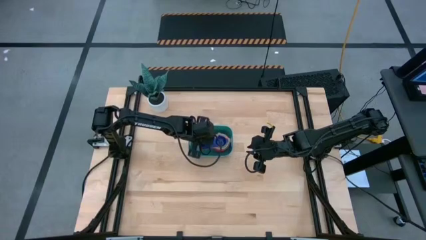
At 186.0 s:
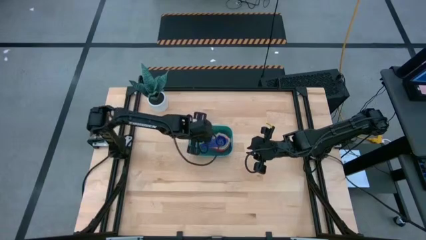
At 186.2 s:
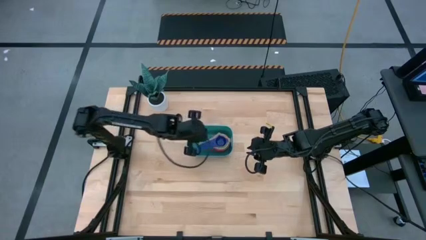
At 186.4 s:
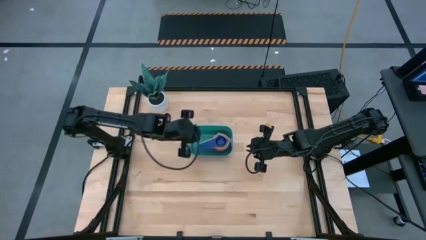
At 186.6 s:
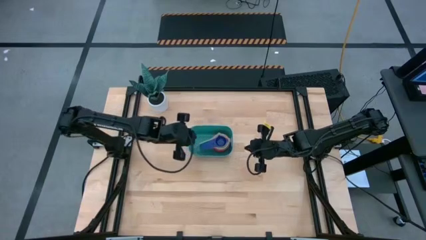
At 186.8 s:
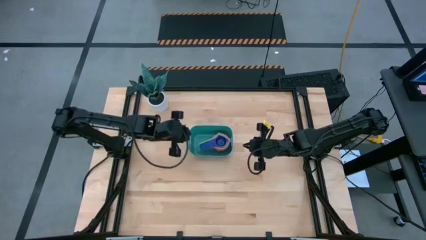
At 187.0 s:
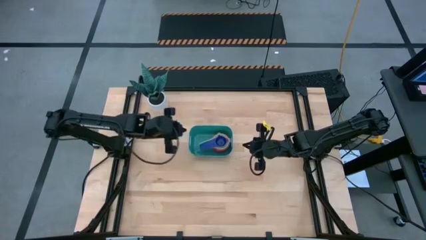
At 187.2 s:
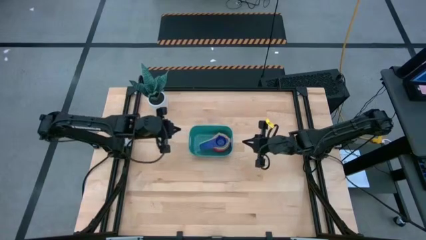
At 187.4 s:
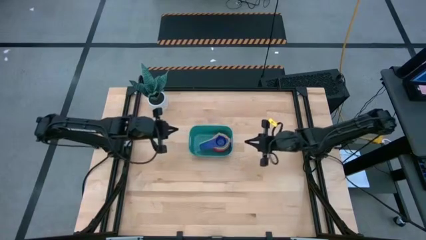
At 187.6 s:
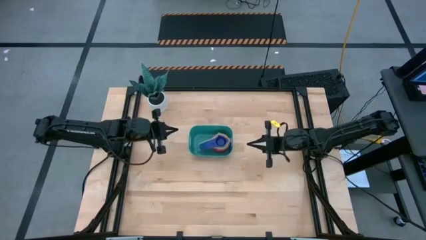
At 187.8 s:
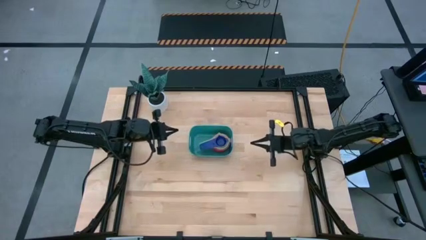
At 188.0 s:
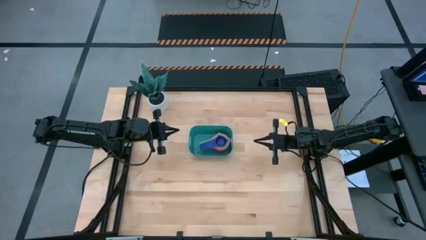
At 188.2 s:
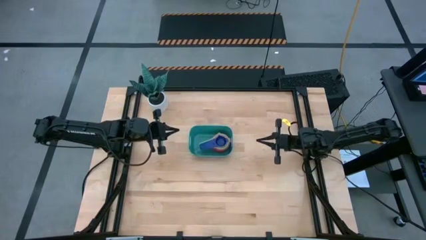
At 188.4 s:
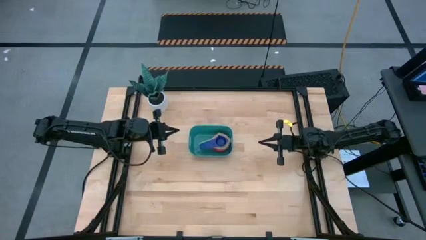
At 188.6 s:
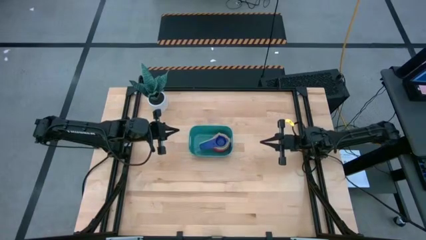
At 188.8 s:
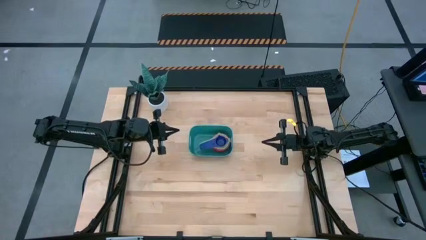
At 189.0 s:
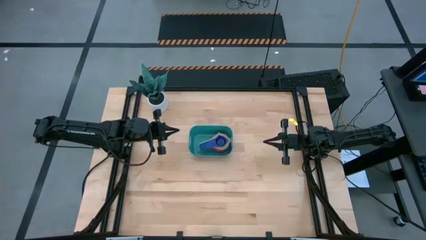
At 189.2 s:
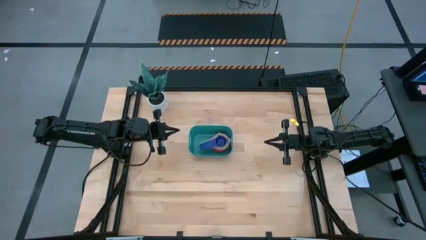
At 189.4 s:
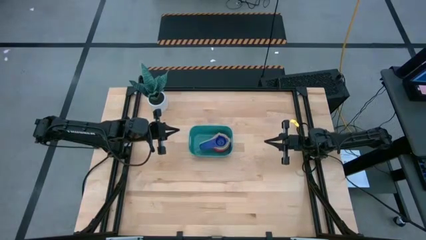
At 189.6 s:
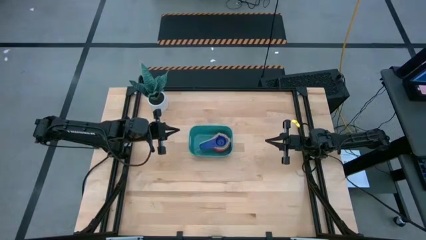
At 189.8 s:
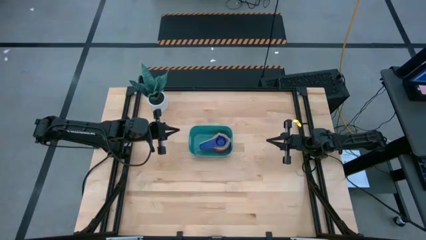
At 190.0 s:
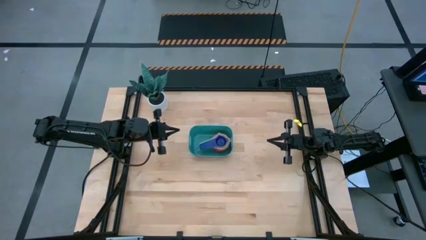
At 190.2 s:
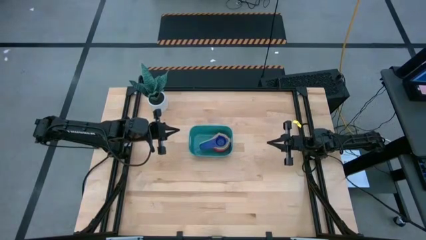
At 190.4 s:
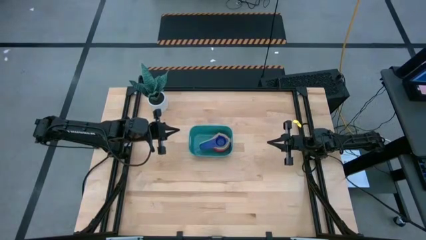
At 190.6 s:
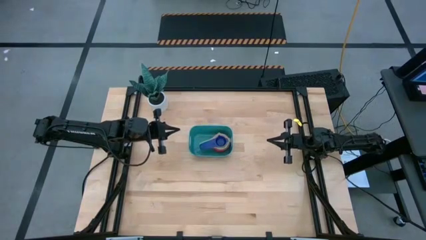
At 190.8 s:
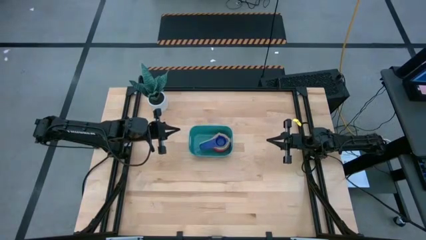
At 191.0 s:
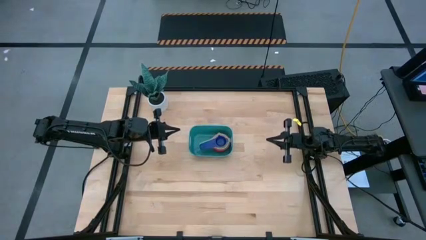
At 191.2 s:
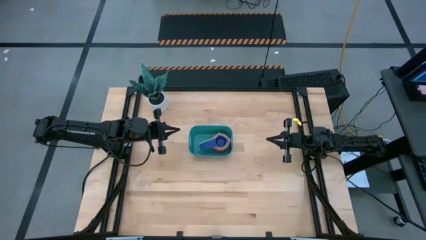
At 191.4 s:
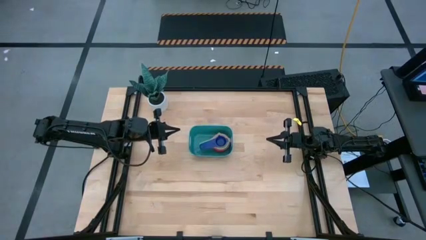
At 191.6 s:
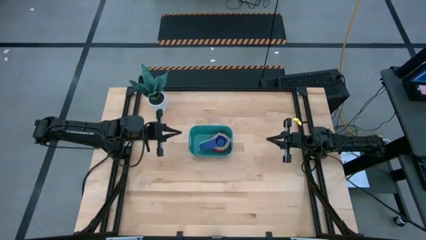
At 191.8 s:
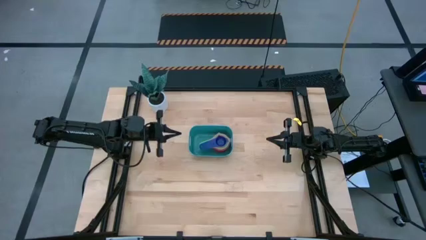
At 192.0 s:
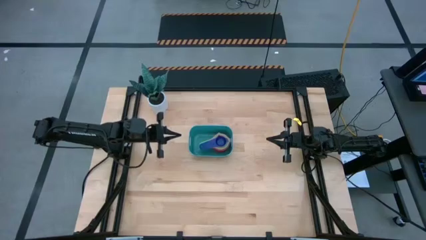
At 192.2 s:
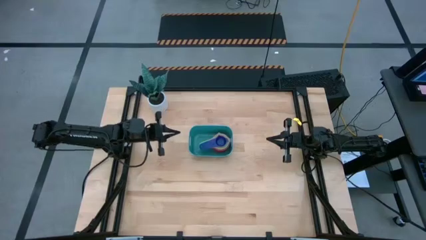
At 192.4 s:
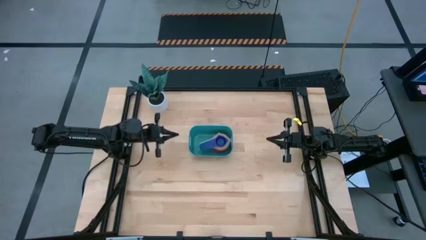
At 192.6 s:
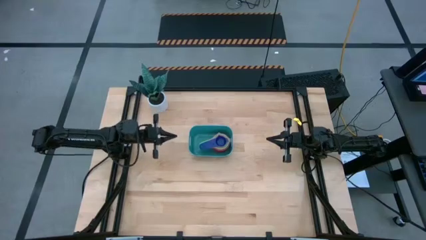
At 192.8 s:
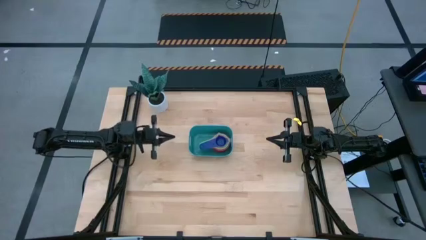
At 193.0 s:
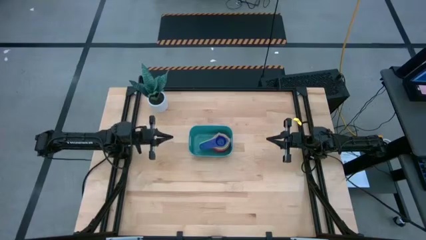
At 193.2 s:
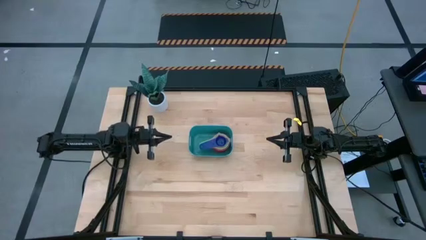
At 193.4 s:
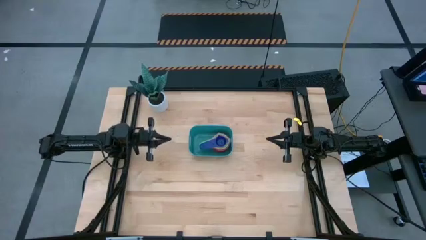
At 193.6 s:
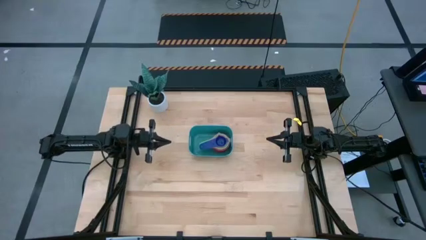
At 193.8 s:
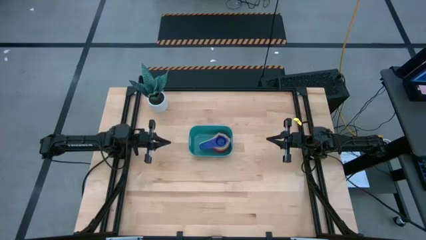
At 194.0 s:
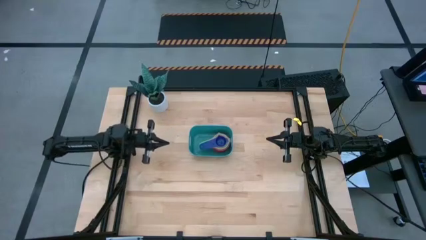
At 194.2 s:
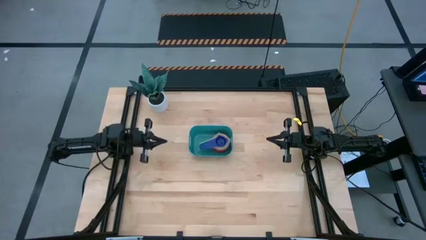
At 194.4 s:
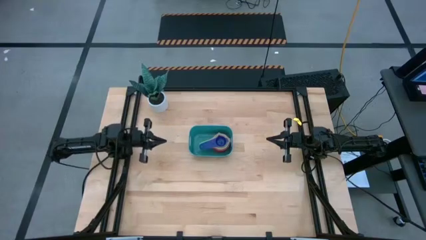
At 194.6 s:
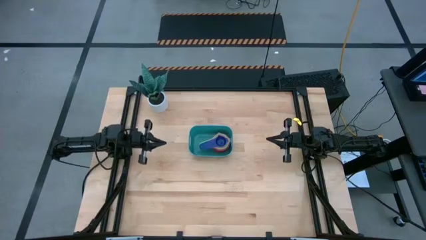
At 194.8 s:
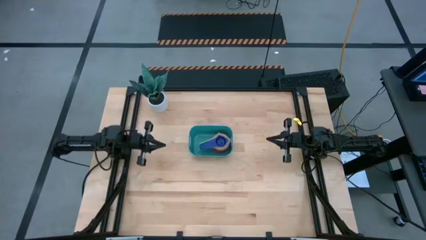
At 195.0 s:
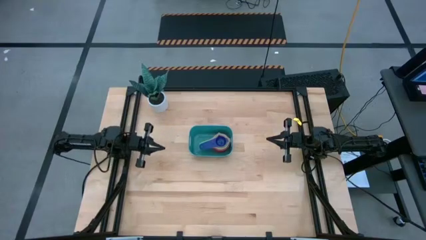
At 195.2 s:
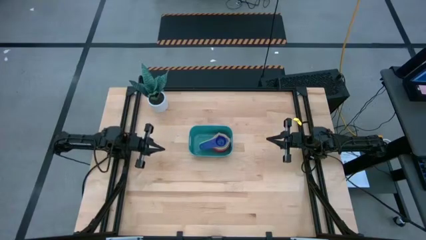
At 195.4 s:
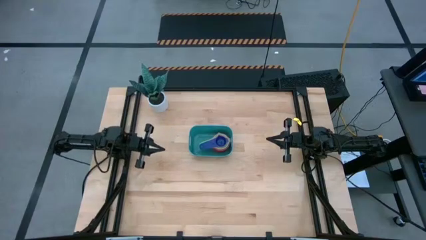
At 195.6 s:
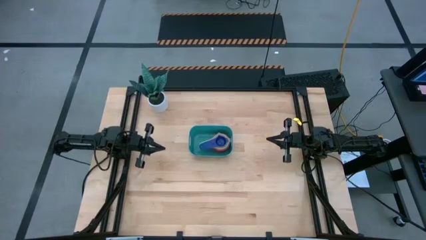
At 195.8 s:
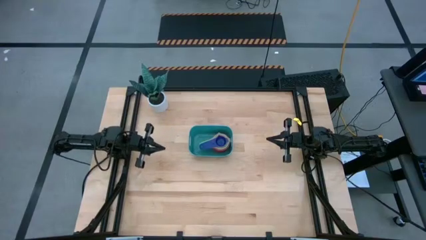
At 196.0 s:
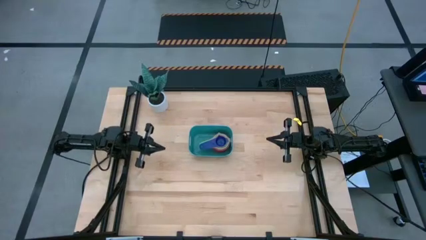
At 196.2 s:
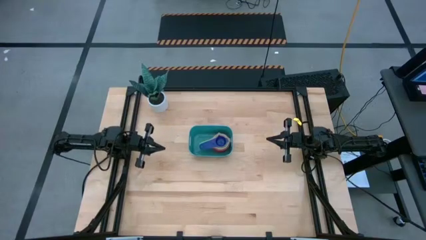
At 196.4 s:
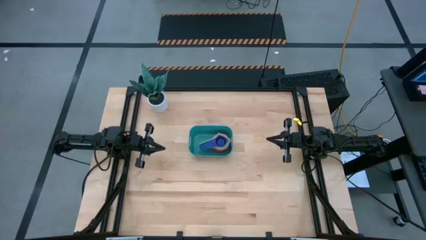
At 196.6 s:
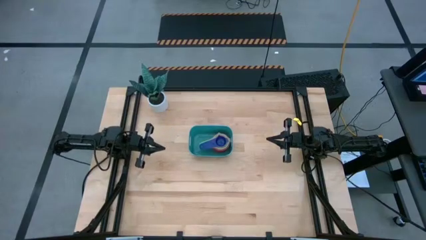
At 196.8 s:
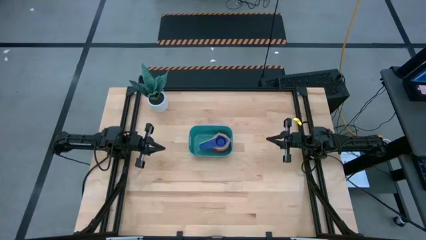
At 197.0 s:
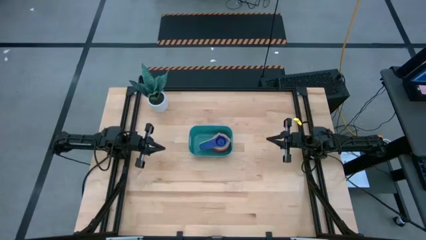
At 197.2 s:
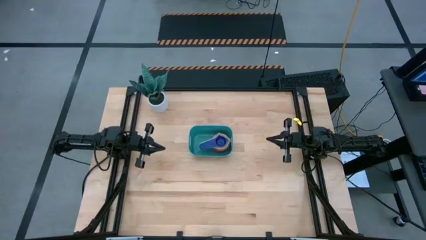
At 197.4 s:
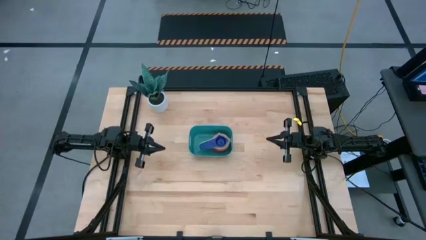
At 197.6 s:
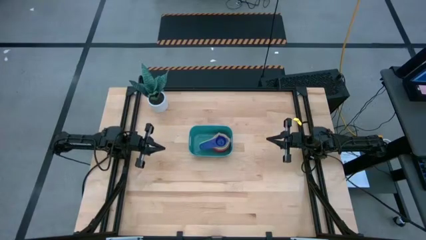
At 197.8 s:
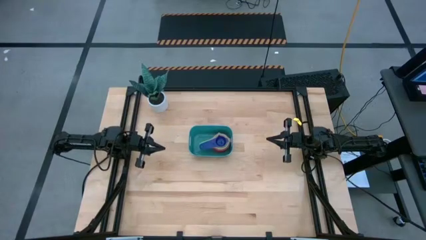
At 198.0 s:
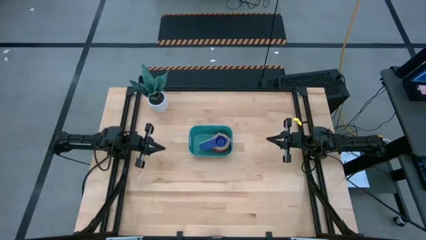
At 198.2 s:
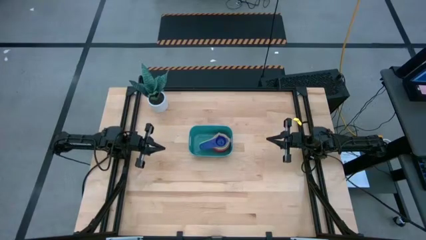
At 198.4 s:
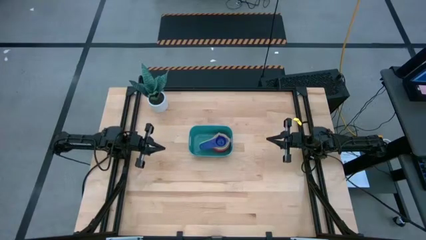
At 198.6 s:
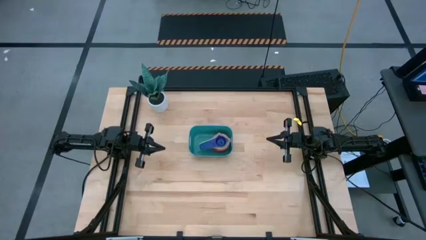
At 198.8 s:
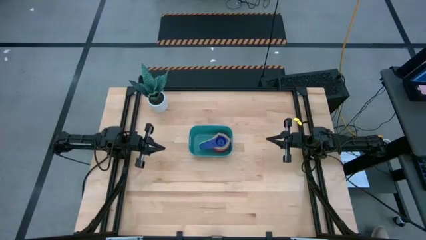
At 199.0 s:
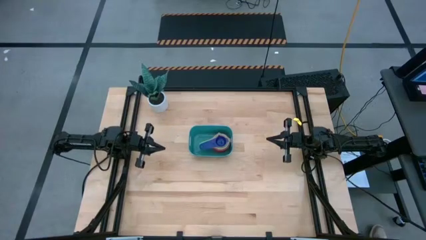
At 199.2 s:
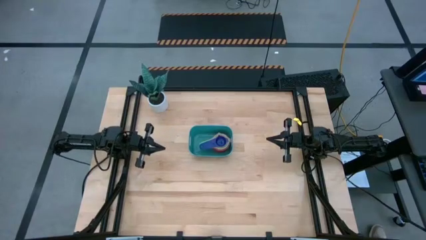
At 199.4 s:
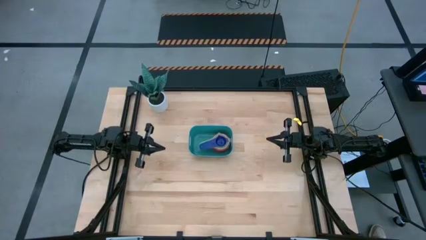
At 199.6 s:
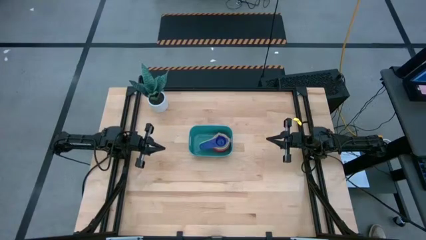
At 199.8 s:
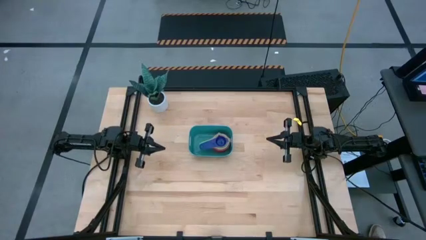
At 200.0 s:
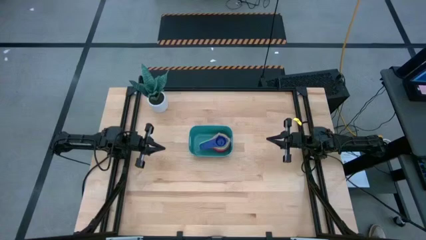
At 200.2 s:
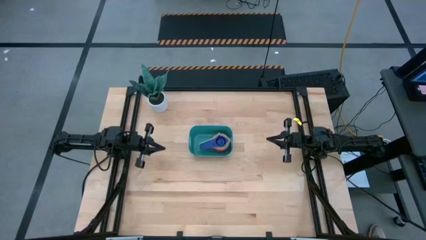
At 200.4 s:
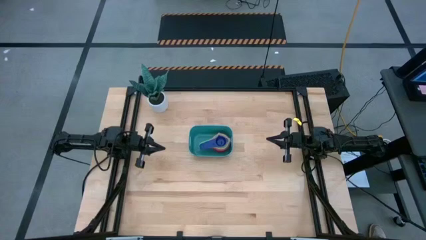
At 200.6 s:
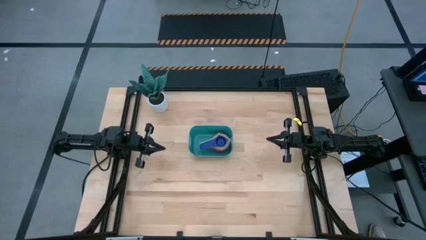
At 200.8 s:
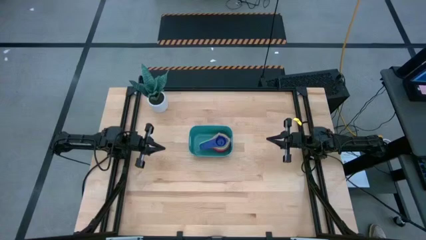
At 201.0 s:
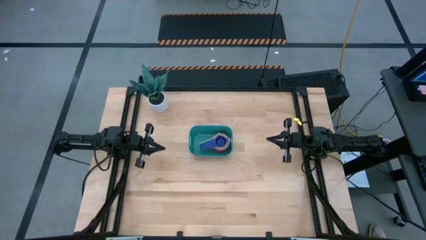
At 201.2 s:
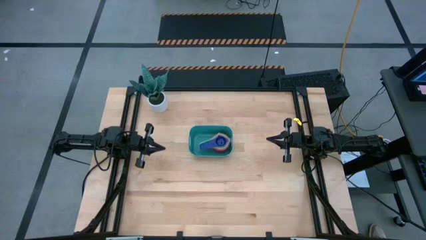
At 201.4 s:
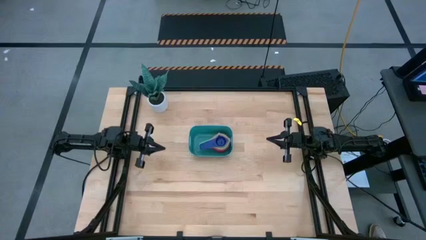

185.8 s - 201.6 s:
Task: Nest measuring cups in basket
Return to Home Position
